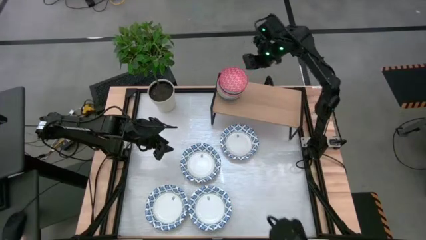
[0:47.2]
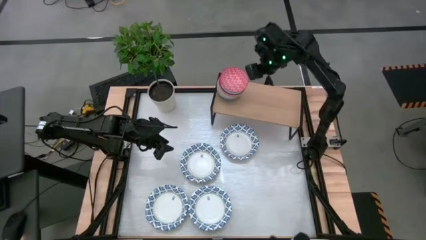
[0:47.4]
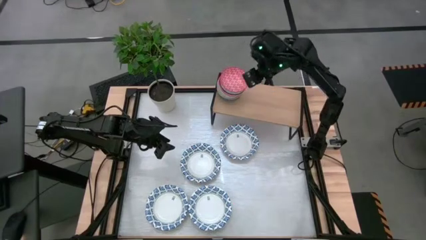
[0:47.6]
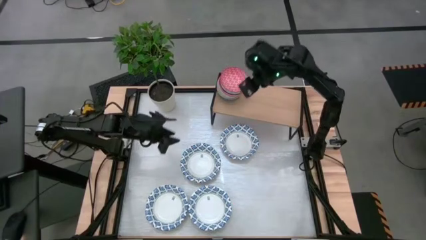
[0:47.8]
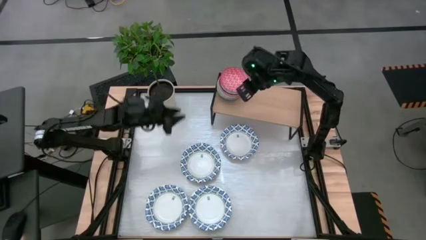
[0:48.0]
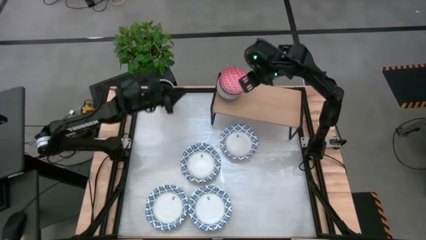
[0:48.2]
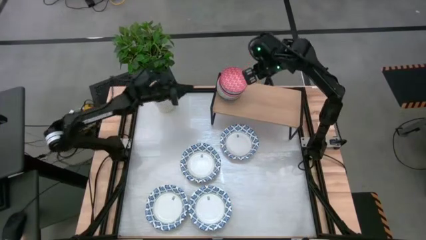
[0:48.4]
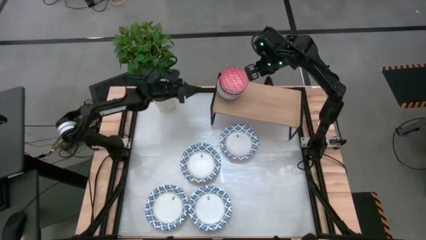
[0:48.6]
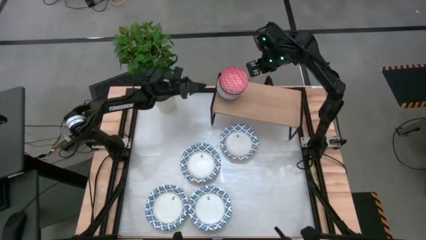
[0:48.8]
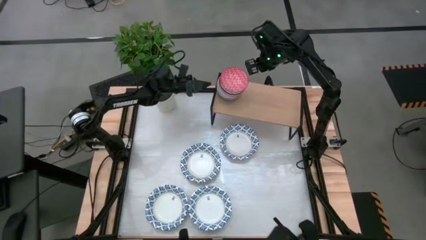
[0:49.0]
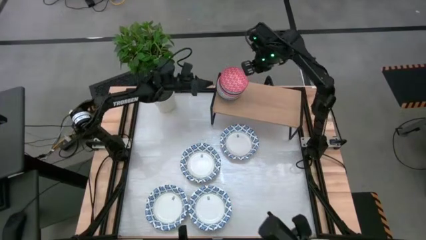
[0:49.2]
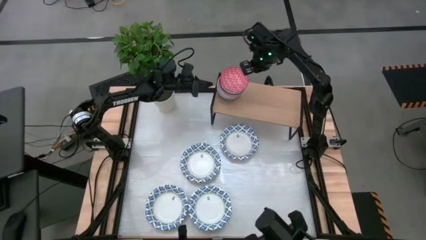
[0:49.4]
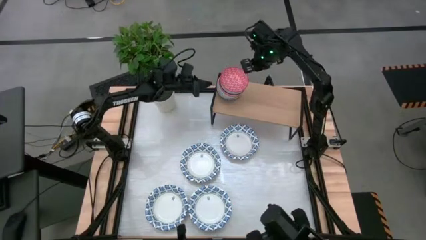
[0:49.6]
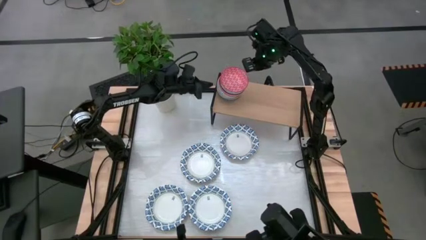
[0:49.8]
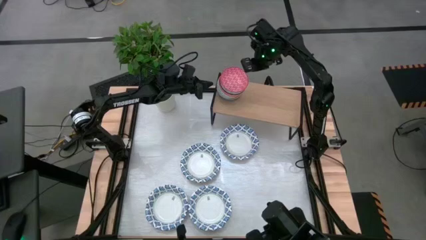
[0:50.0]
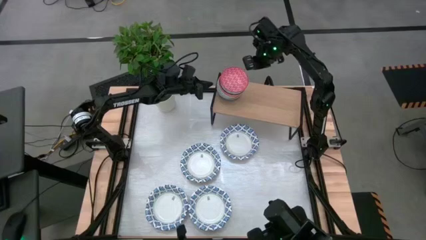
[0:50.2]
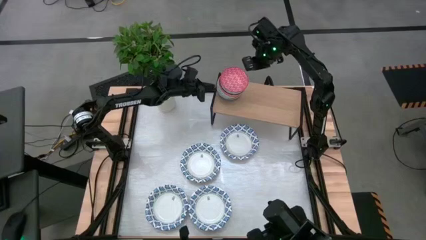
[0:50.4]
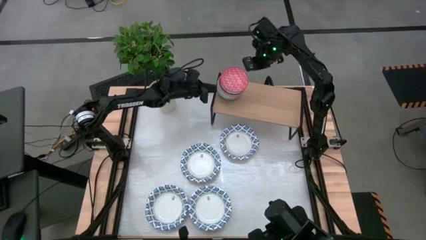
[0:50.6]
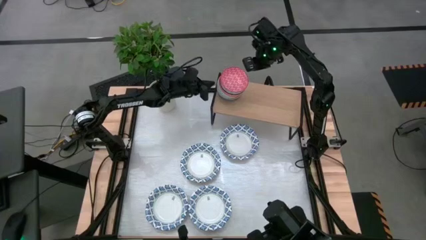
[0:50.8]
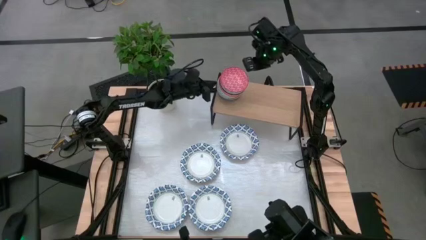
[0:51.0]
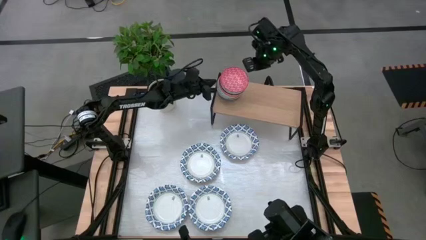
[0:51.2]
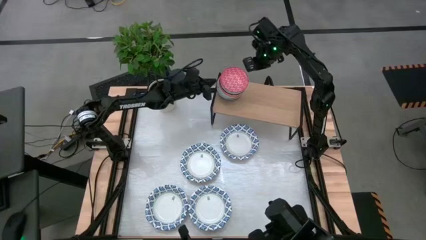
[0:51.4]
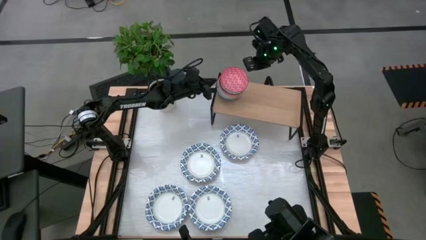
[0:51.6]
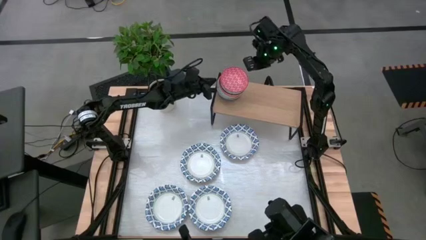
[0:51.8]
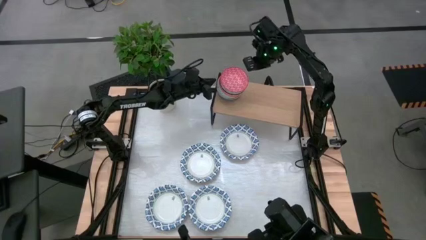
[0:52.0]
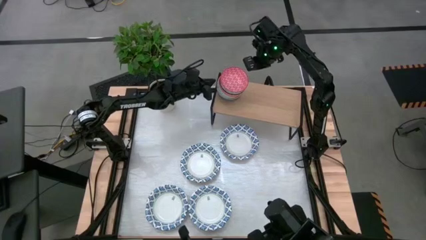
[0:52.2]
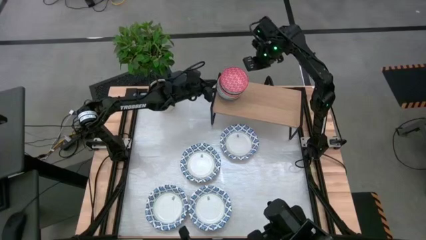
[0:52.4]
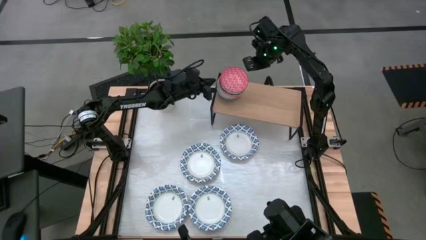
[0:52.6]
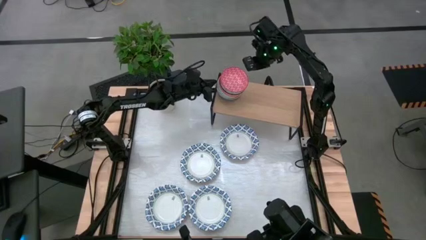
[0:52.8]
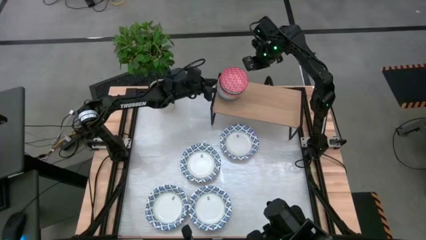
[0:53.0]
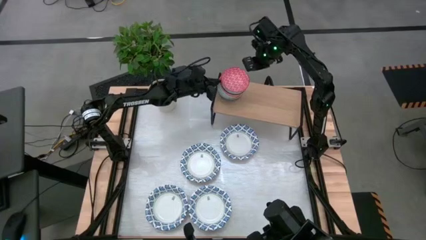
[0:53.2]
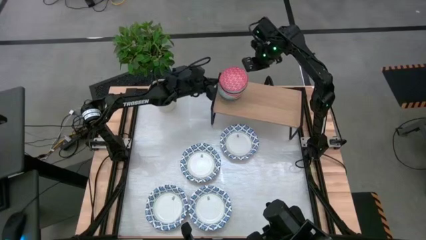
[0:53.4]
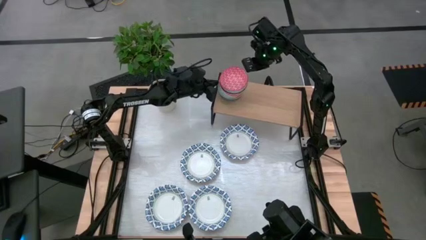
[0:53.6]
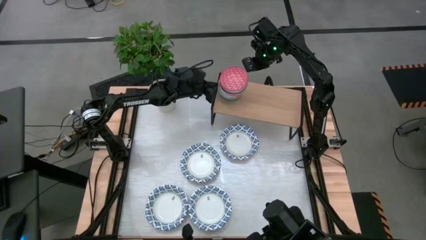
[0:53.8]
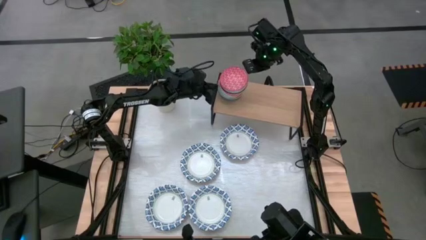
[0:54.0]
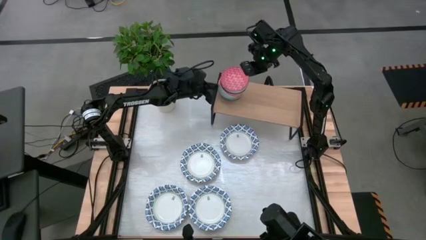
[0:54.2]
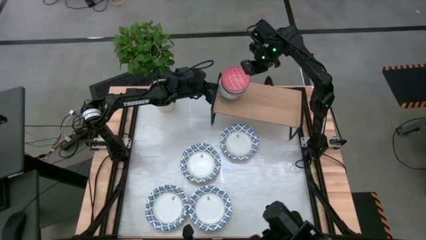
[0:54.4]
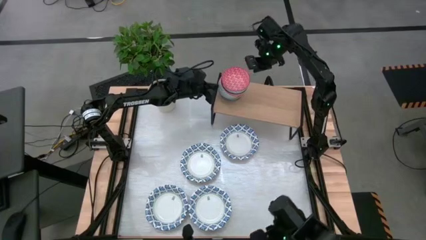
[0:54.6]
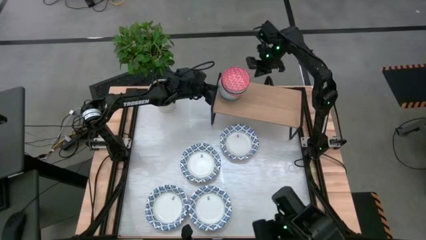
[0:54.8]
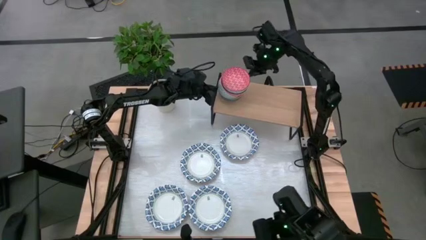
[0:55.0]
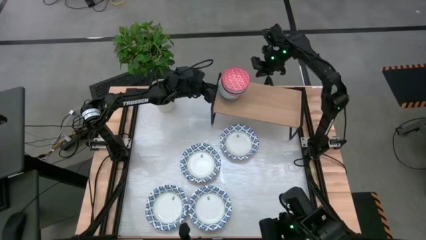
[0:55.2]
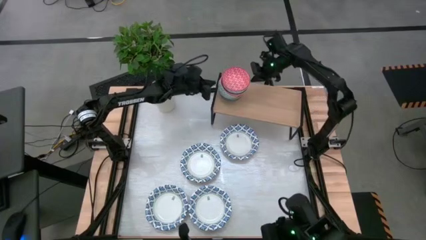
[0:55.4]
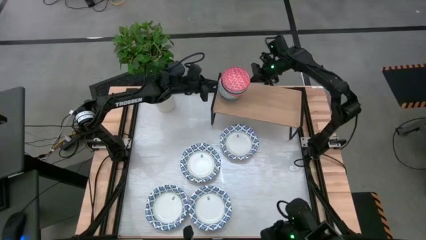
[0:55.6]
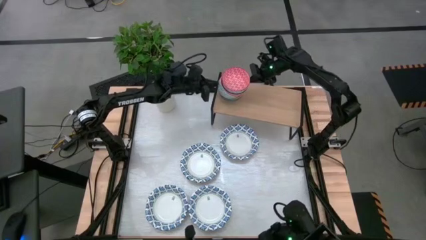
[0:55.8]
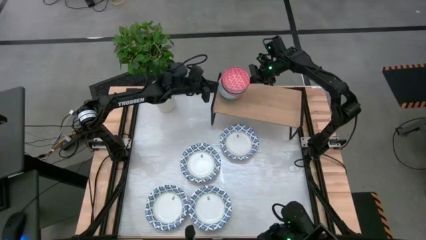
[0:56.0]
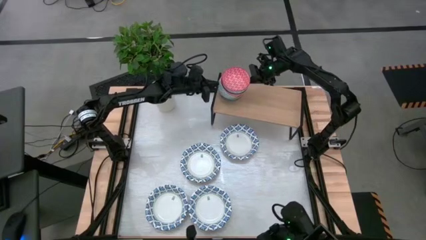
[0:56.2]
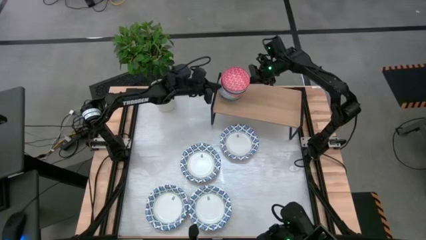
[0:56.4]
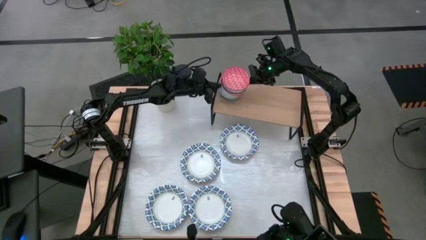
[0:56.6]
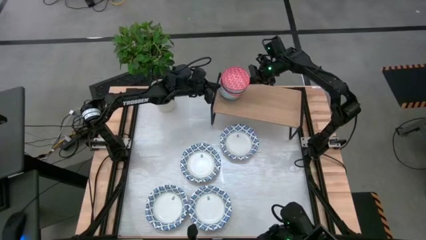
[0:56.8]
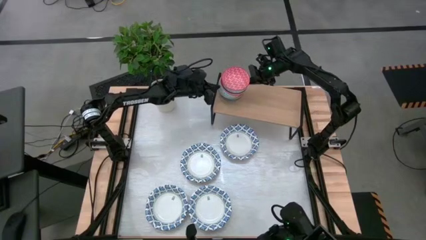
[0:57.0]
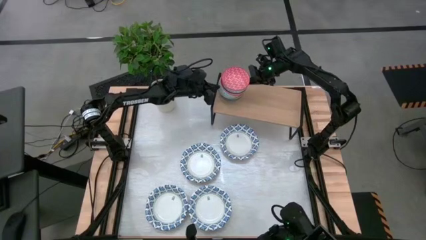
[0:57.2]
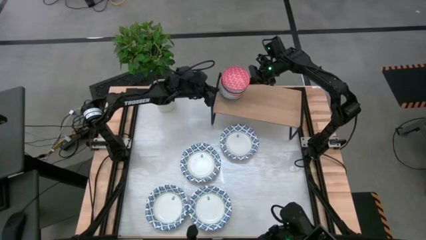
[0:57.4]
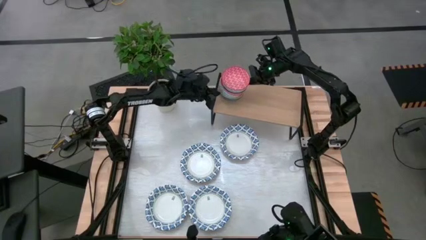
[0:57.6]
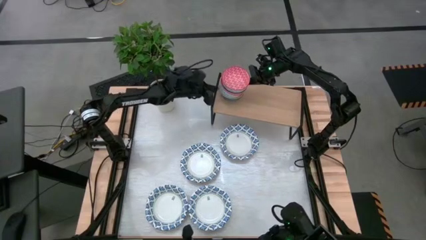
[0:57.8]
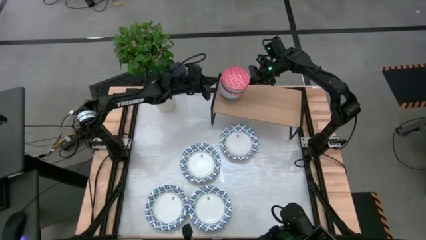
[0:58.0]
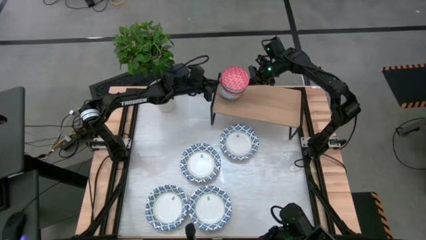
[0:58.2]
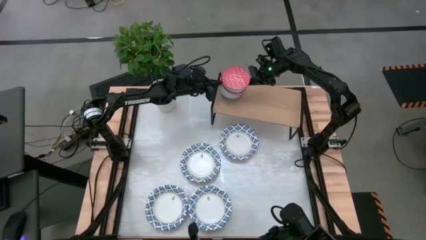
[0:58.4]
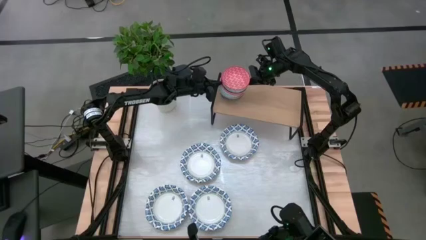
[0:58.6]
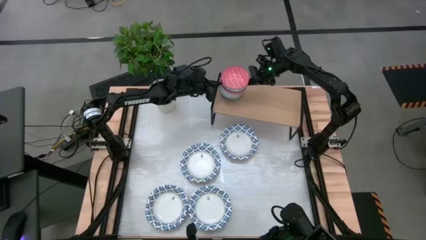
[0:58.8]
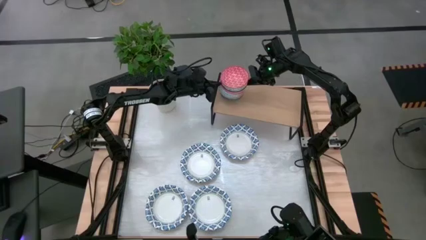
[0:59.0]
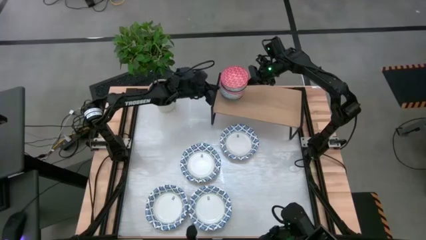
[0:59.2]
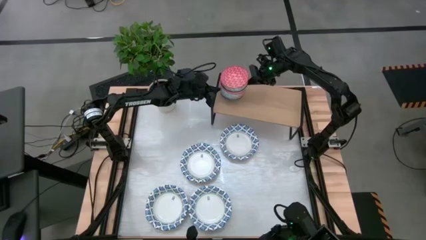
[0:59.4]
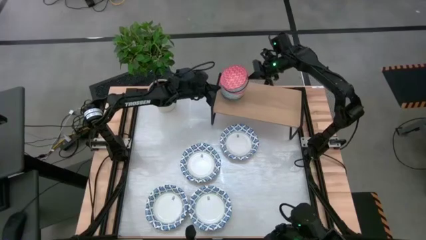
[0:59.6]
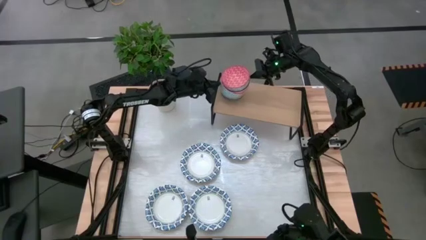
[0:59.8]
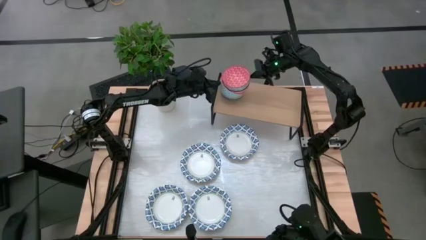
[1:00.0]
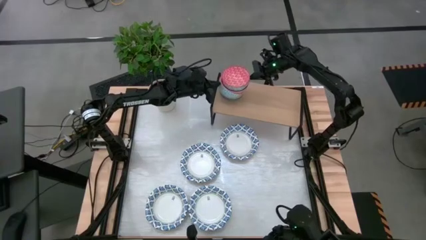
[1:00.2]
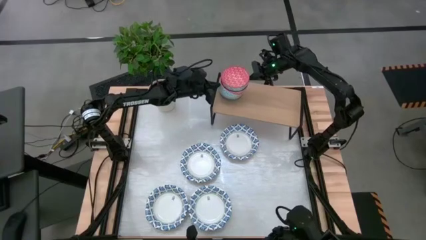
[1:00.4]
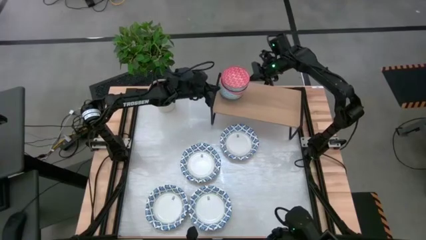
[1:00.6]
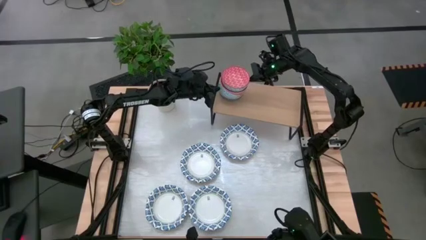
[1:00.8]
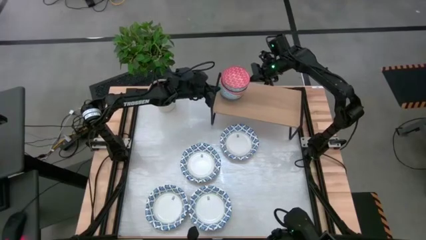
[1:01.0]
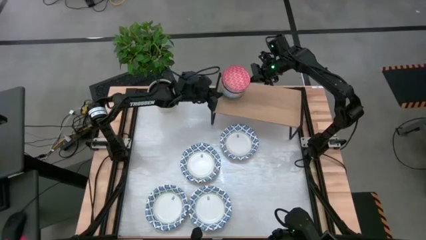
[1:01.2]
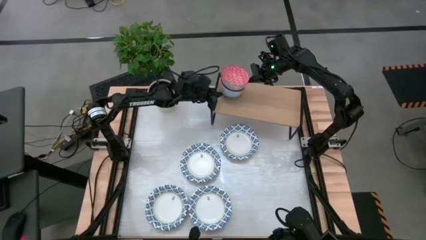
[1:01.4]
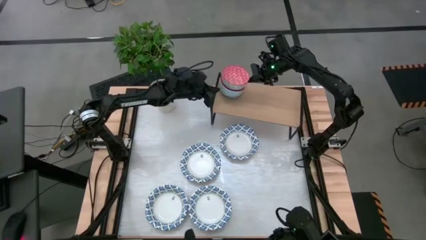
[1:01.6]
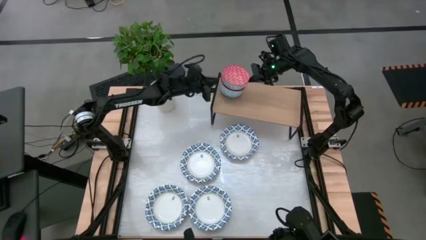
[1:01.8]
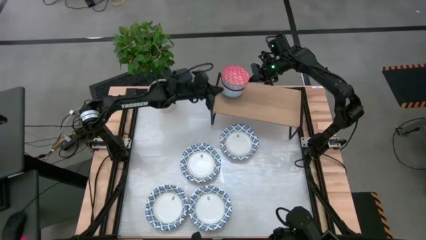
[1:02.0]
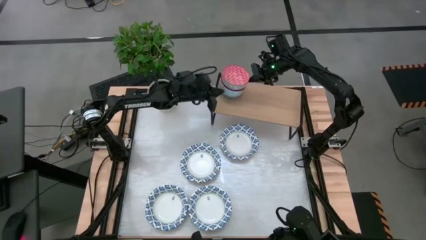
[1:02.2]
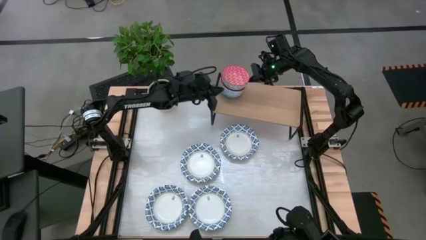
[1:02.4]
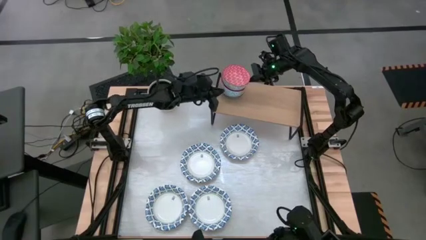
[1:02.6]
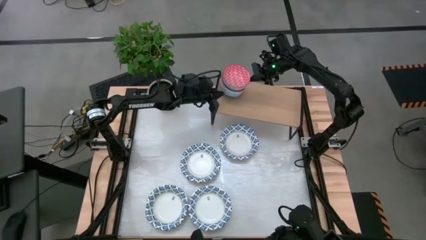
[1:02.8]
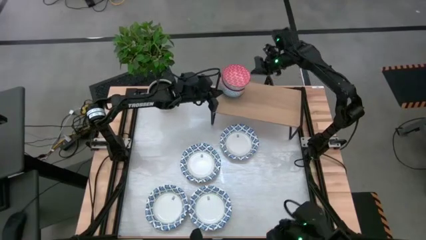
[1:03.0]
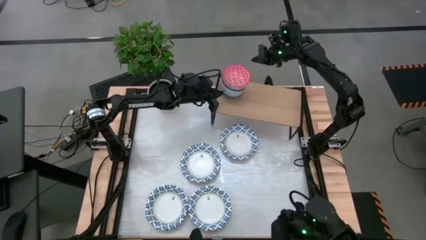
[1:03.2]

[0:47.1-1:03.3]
Task: Place and stack bowls onto a shelf
Adjust the stack of bowls on the shelf
